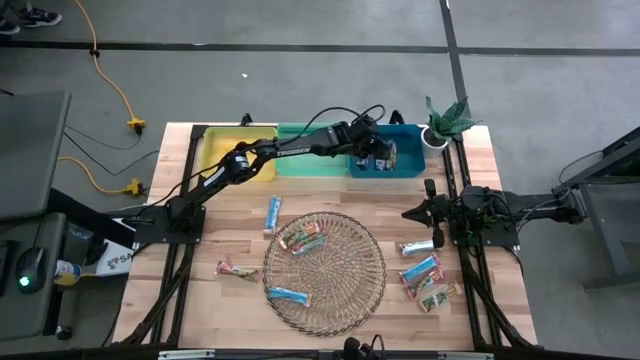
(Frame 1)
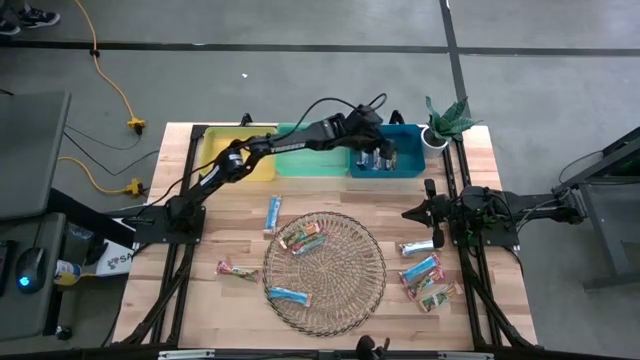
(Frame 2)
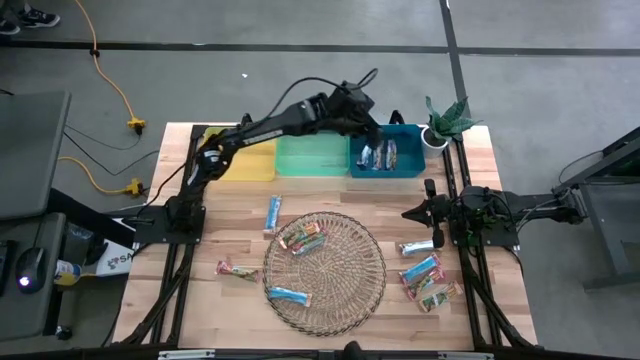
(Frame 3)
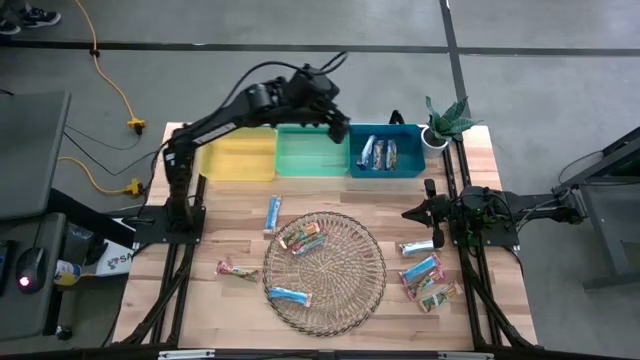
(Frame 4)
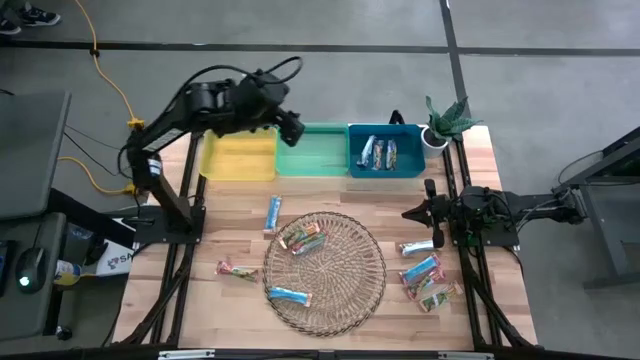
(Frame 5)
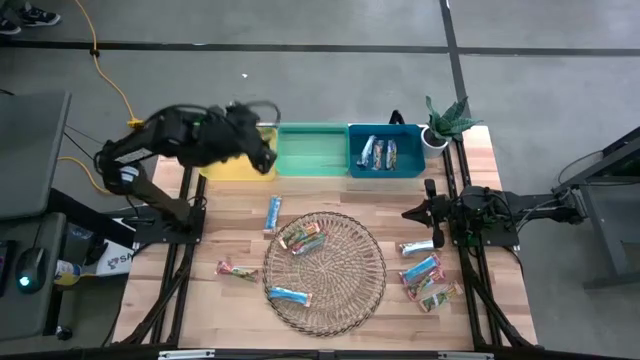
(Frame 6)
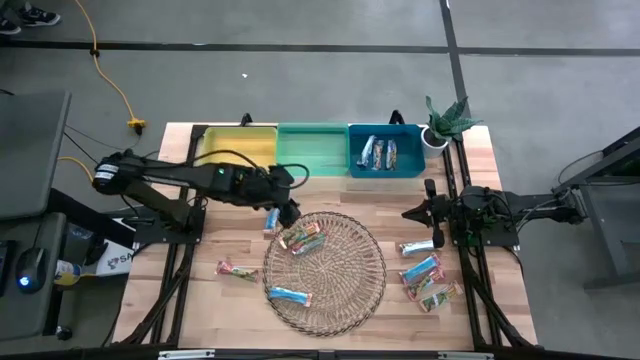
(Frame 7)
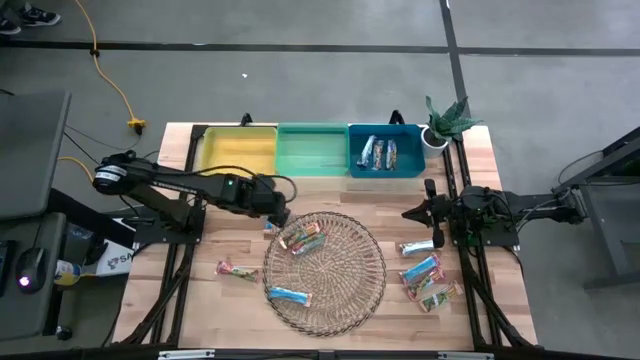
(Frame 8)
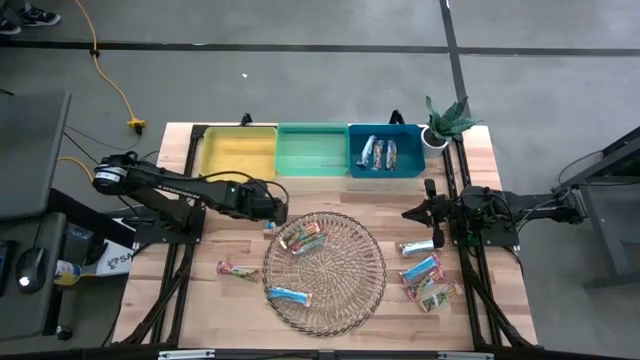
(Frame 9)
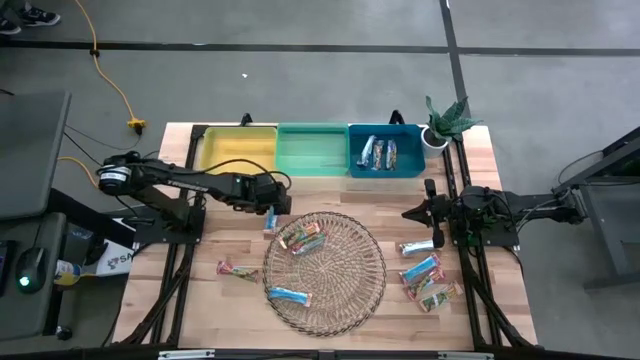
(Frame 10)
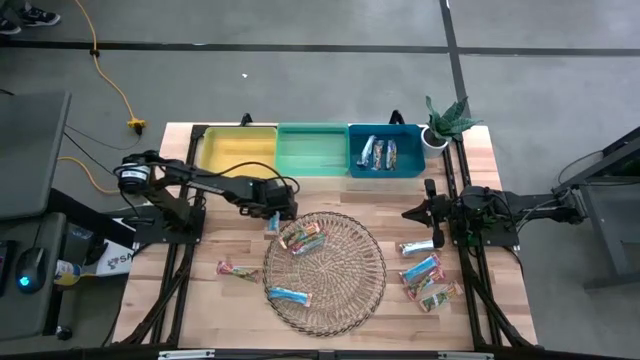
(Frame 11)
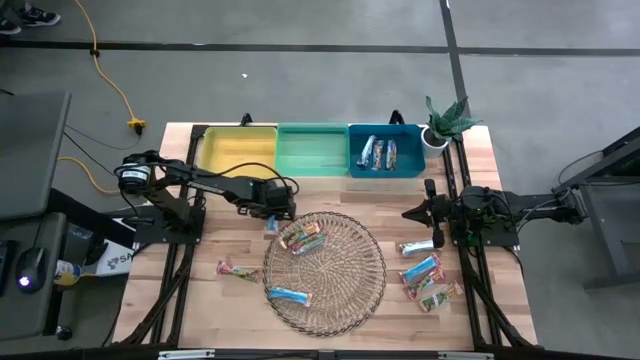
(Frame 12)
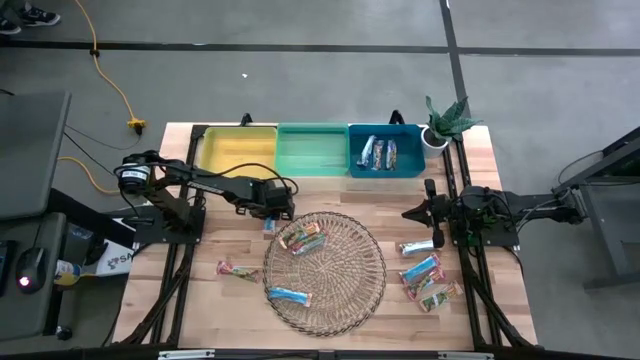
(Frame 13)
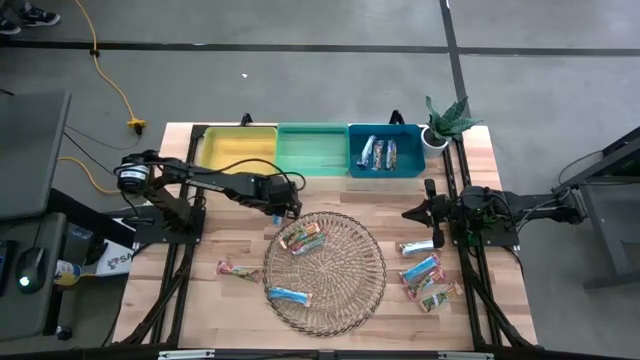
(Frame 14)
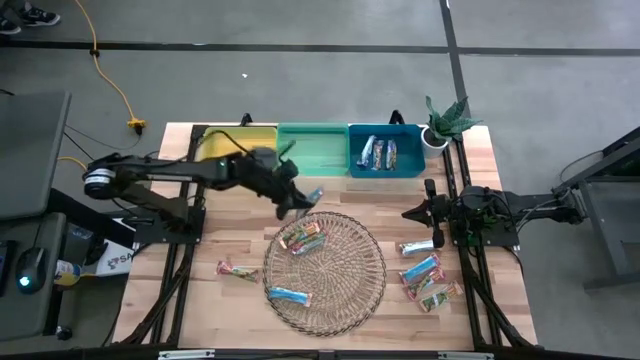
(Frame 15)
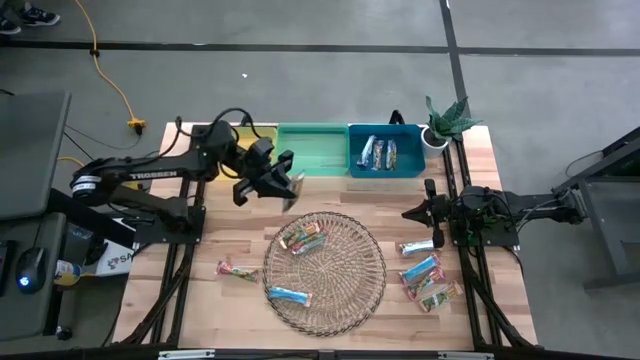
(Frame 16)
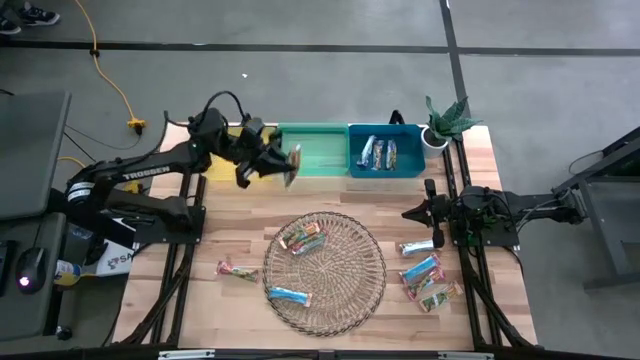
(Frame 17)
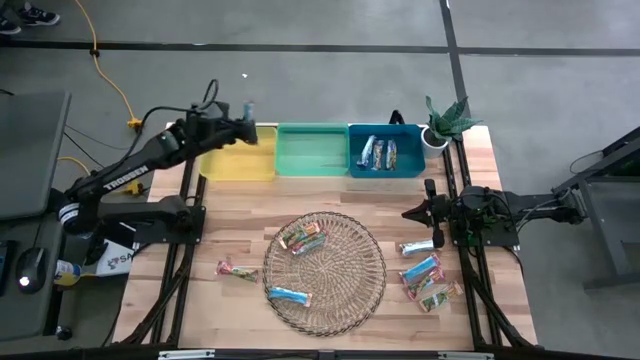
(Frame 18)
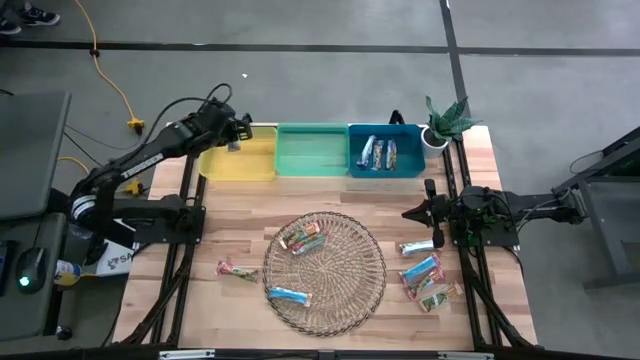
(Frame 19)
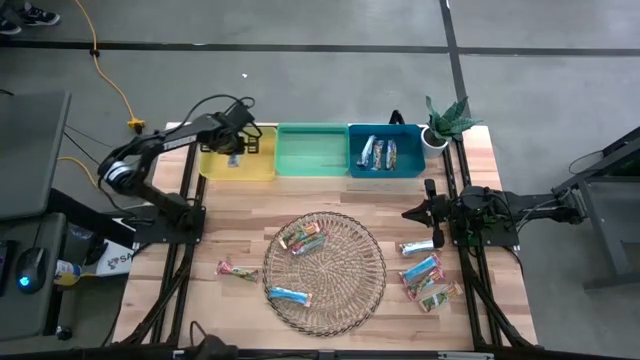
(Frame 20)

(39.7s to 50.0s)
Task: Pick and place Granola Bars by type
Put the yellow granola bar into the yellow bin

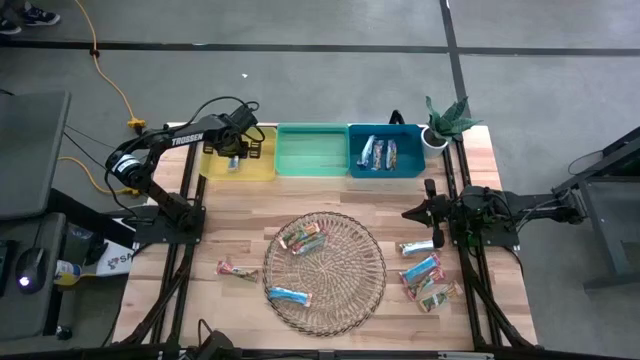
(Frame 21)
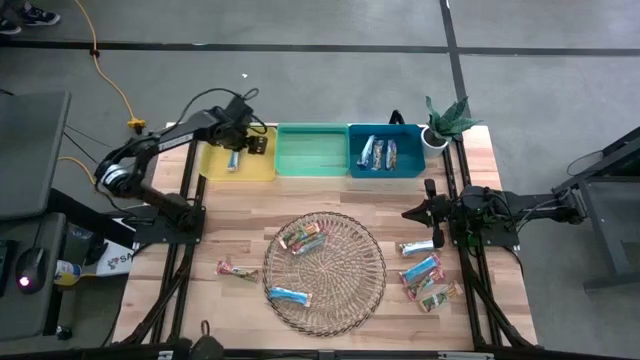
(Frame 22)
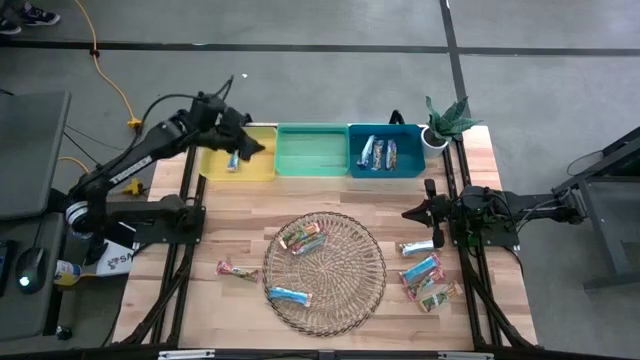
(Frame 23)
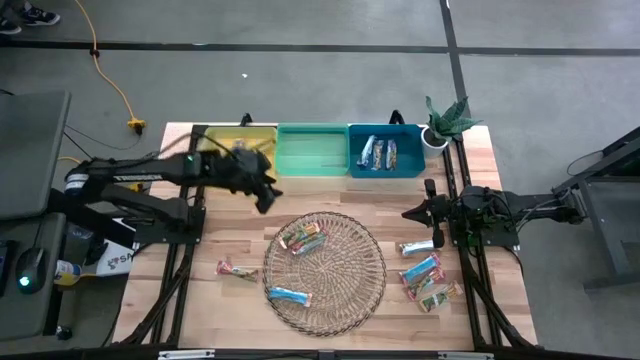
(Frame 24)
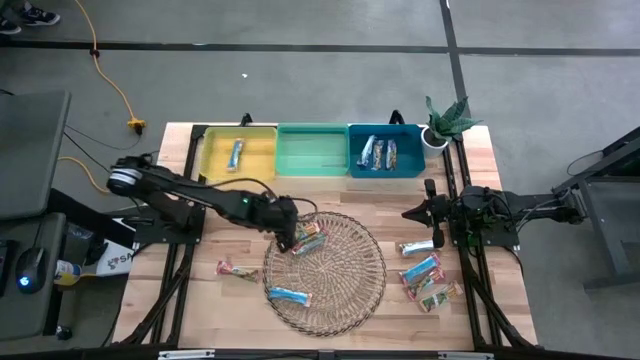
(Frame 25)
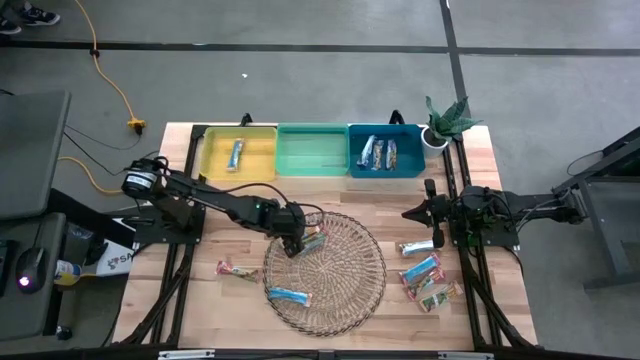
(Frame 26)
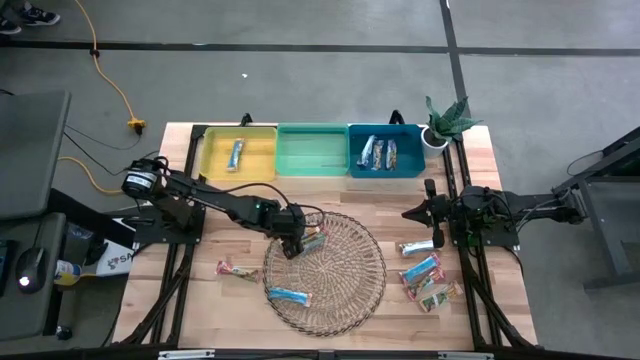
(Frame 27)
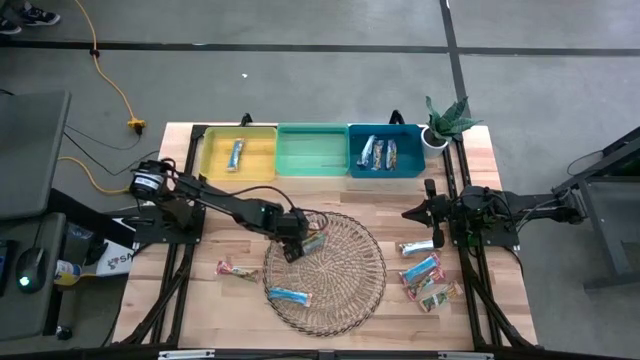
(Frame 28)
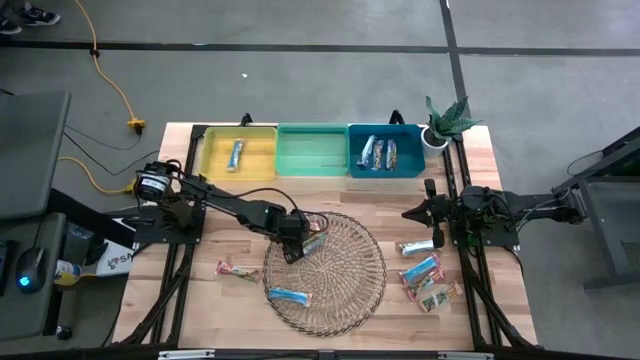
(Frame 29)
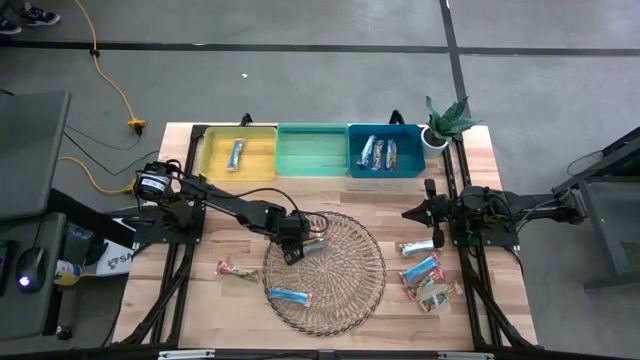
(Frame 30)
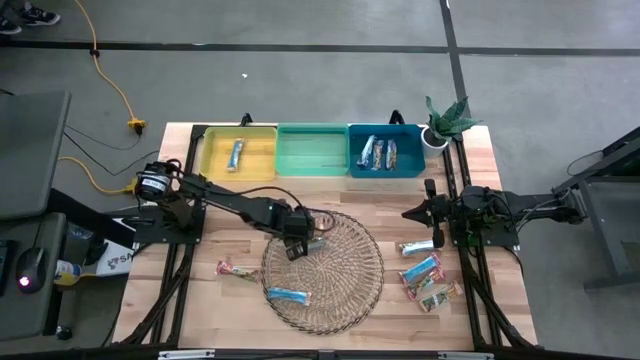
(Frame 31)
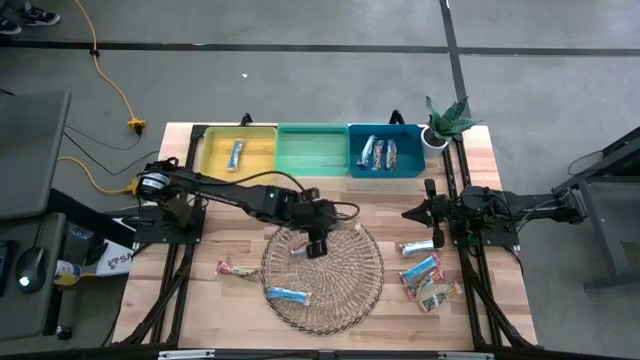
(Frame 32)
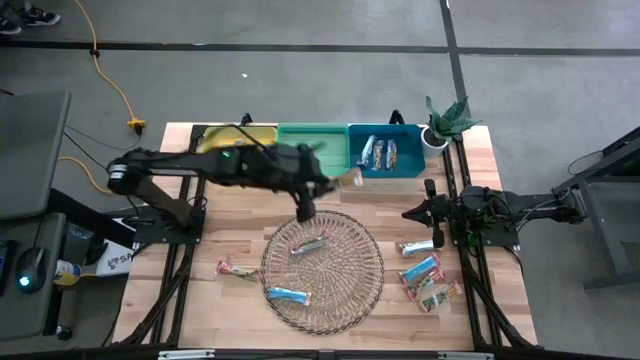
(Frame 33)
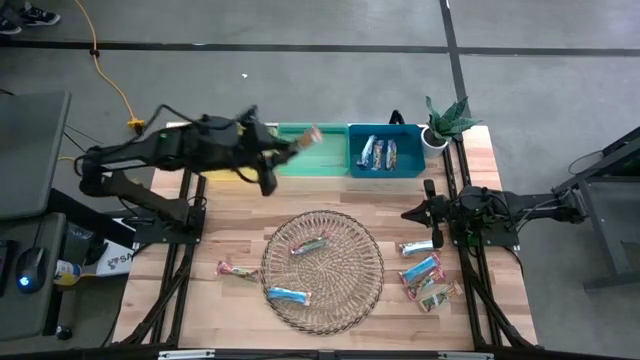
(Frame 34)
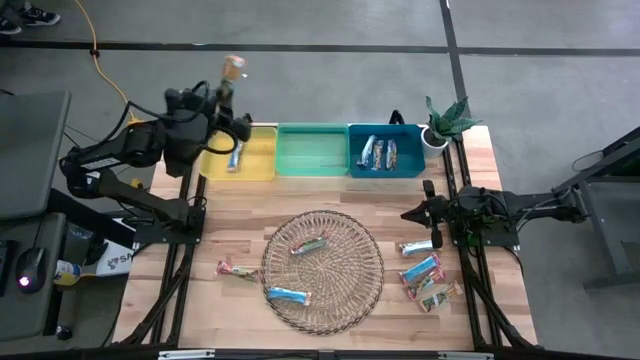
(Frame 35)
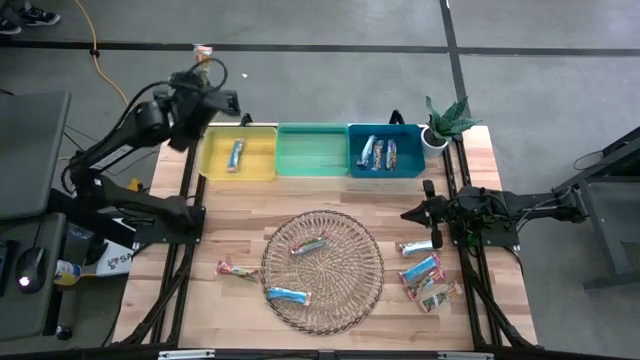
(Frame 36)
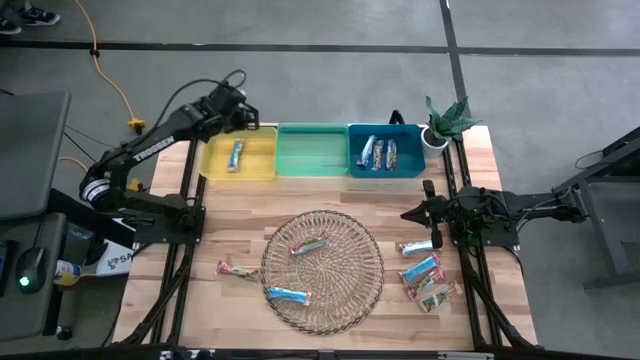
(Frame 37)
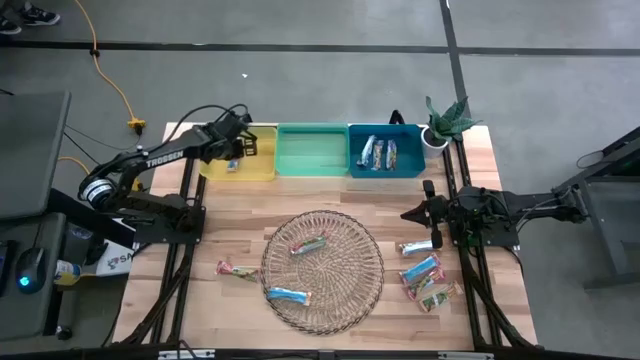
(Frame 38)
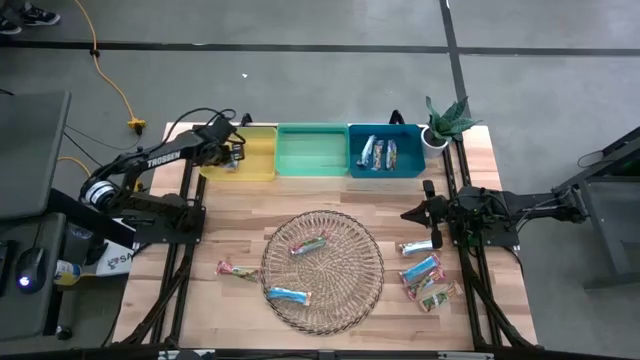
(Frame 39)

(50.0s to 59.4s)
Put the yellow granola bar into the yellow bin

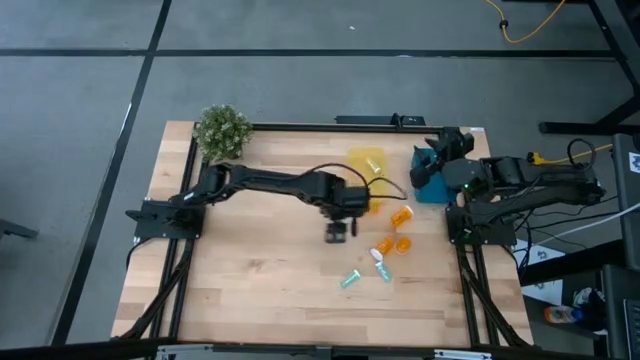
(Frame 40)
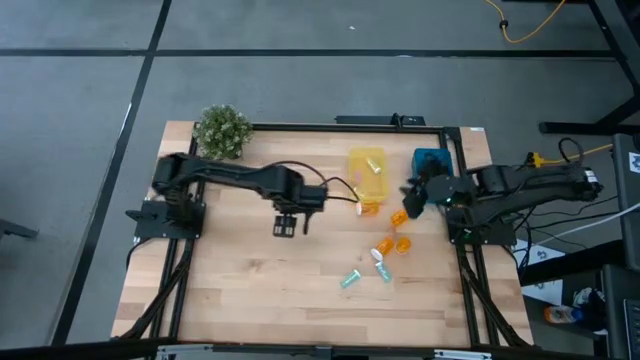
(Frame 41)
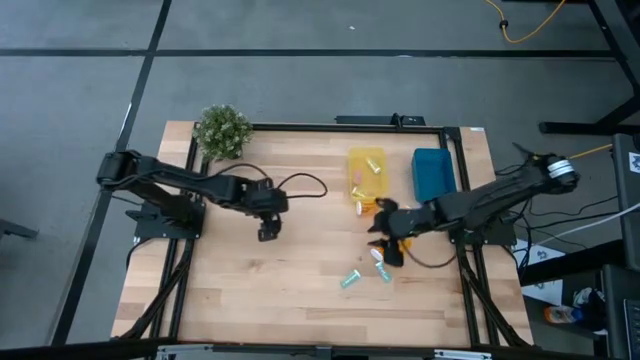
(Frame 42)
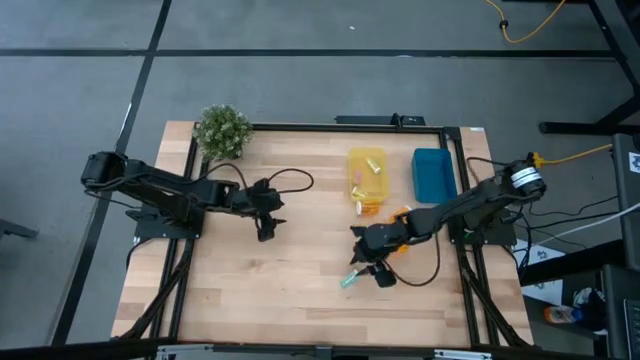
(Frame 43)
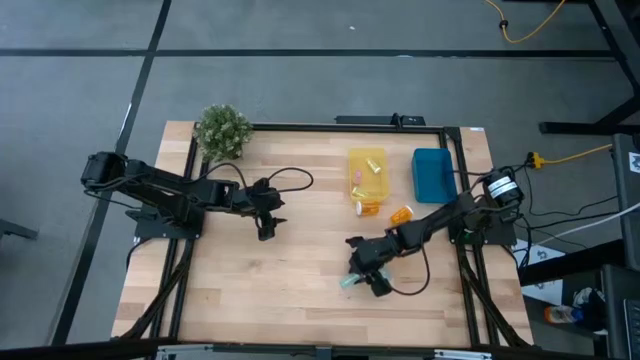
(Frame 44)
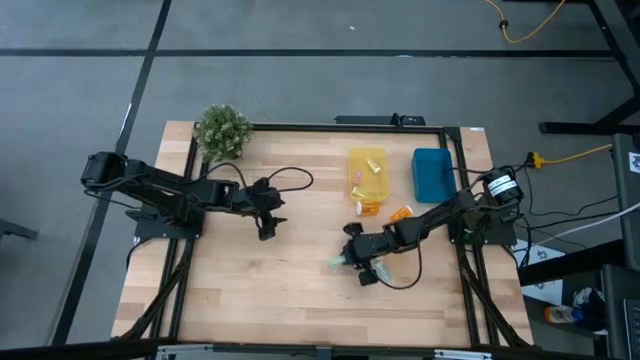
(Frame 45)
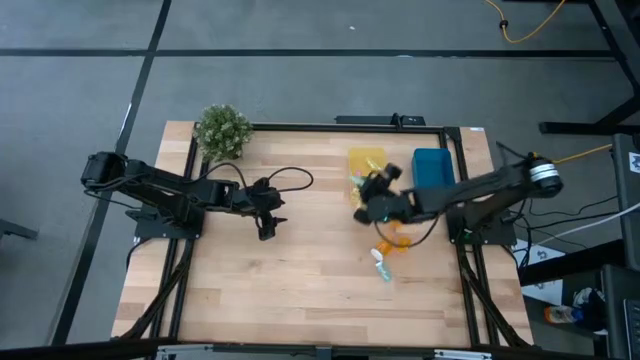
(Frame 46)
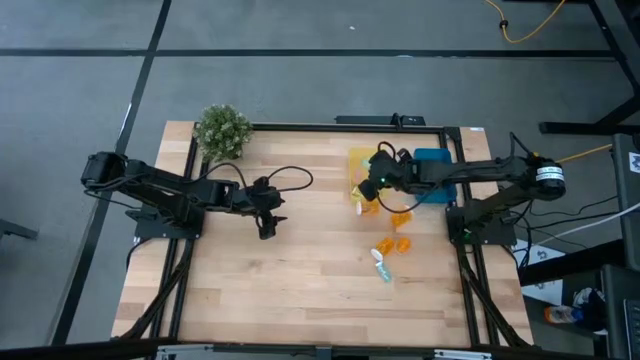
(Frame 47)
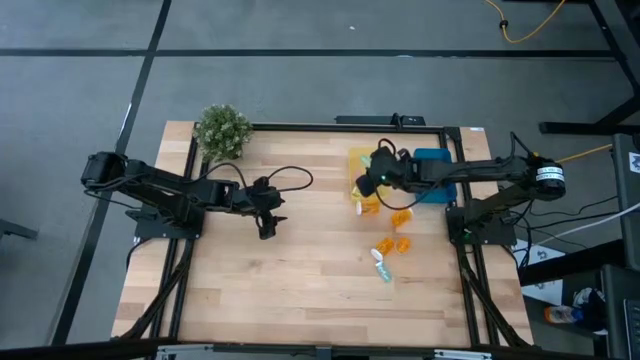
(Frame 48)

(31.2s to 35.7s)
Task: Pick and place medicine bottles into bin by pill shape (circle, oval)
Put the small blue pill bottle into the yellow bin
